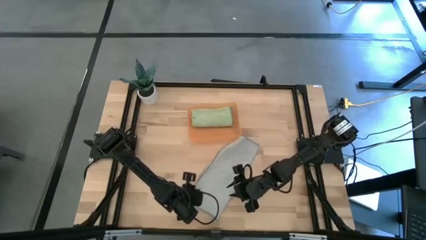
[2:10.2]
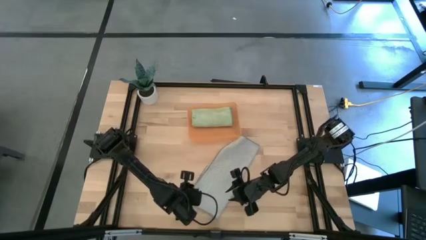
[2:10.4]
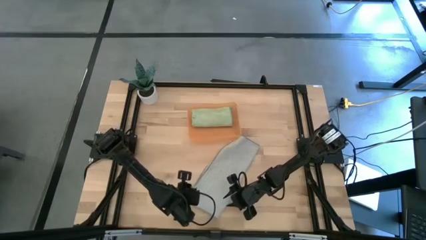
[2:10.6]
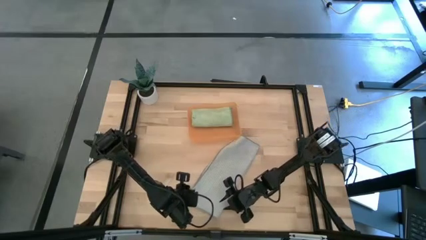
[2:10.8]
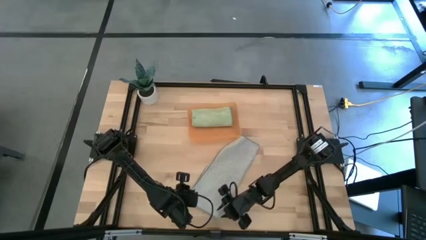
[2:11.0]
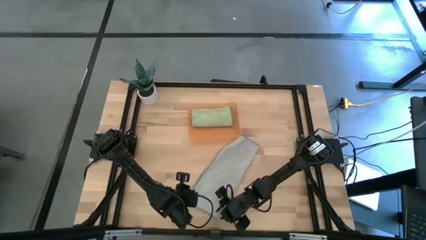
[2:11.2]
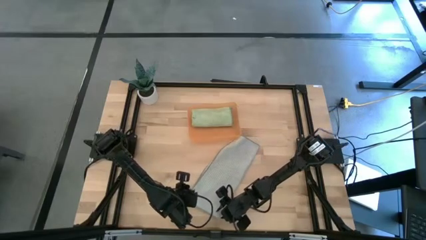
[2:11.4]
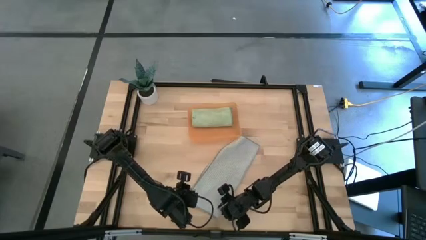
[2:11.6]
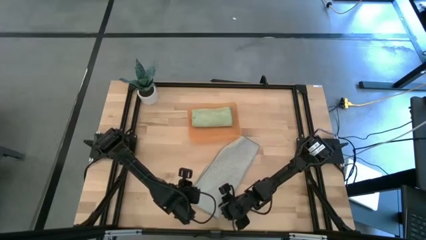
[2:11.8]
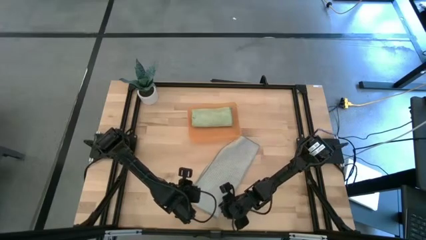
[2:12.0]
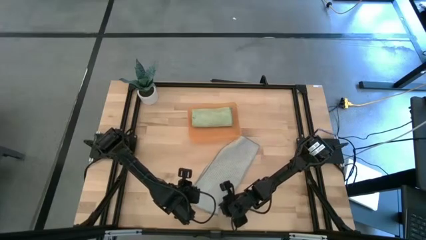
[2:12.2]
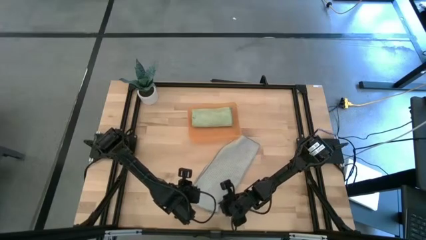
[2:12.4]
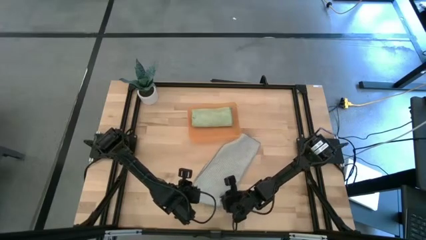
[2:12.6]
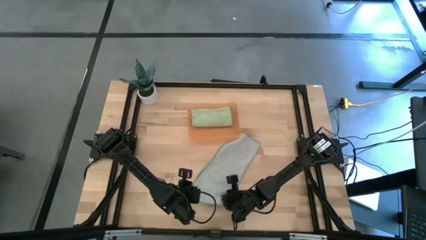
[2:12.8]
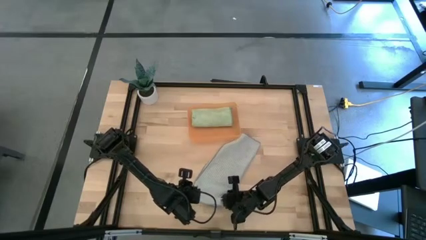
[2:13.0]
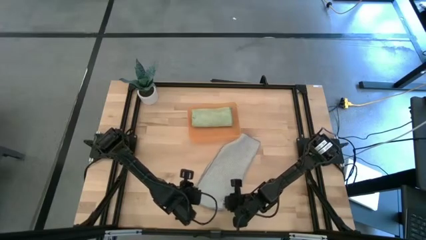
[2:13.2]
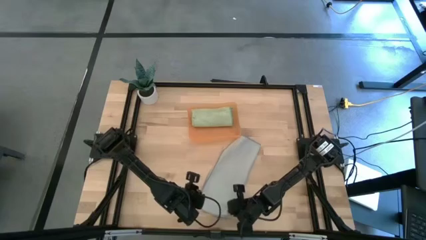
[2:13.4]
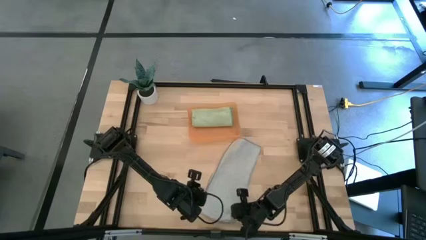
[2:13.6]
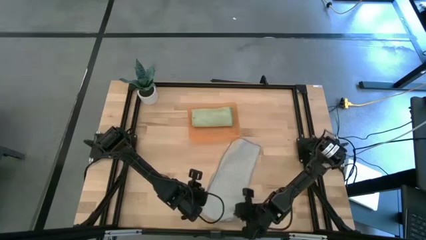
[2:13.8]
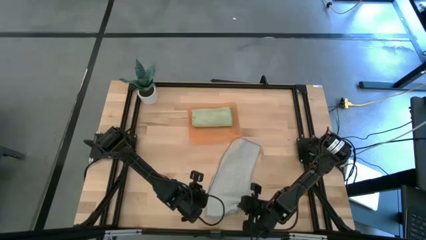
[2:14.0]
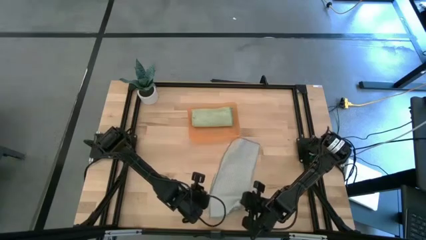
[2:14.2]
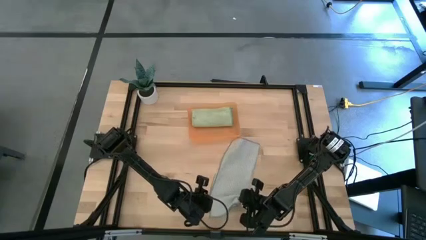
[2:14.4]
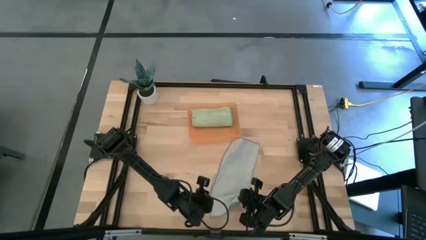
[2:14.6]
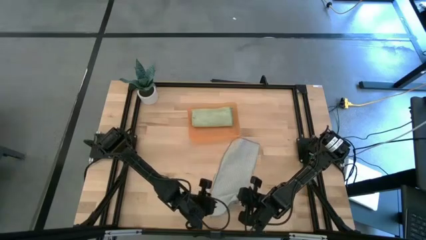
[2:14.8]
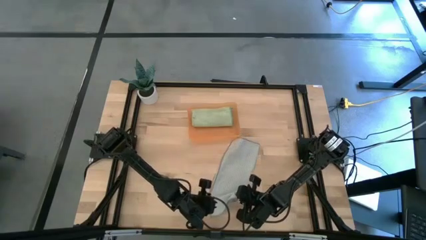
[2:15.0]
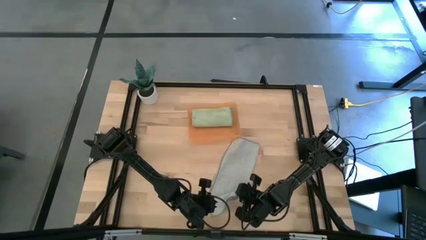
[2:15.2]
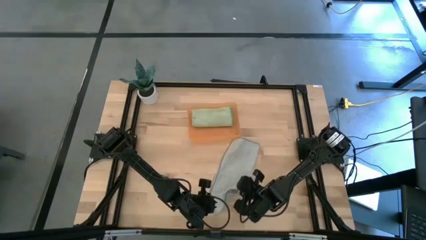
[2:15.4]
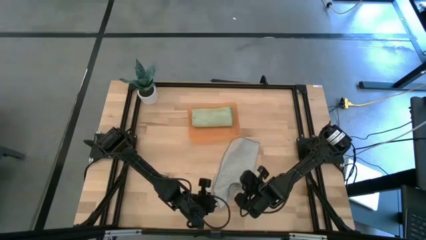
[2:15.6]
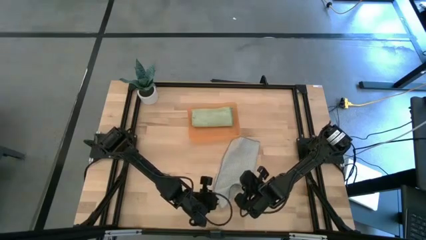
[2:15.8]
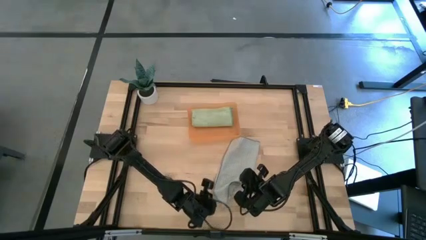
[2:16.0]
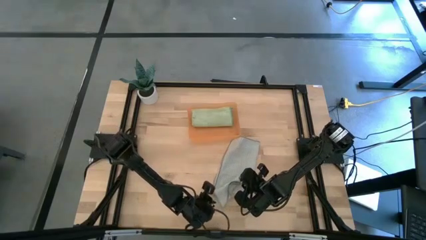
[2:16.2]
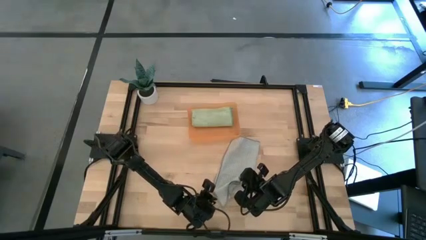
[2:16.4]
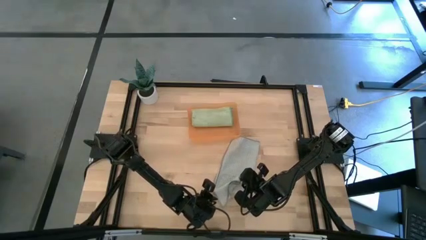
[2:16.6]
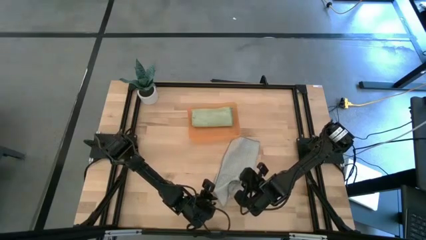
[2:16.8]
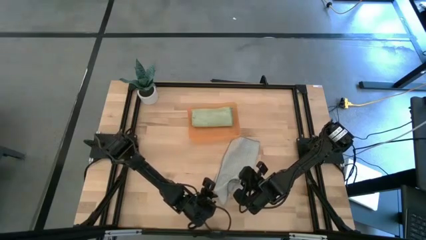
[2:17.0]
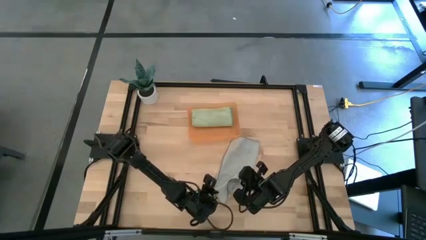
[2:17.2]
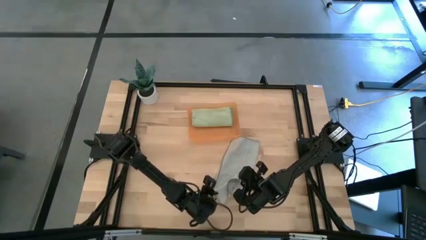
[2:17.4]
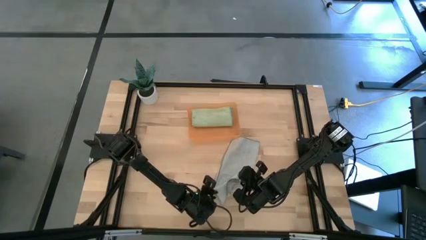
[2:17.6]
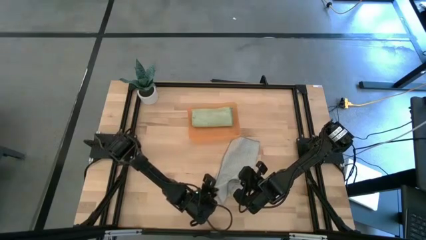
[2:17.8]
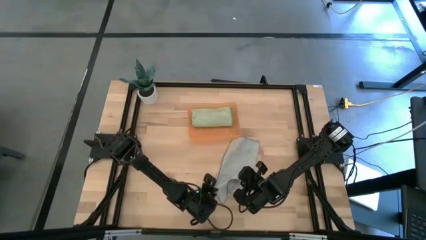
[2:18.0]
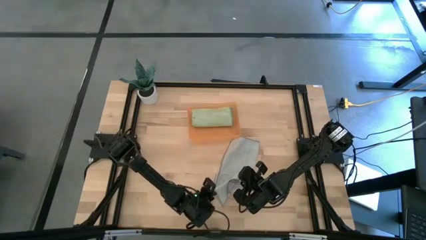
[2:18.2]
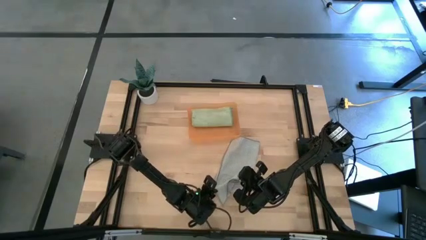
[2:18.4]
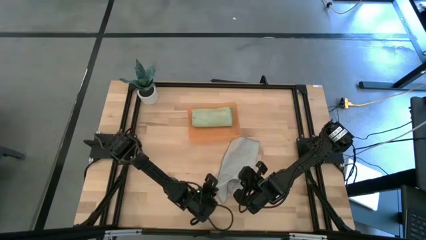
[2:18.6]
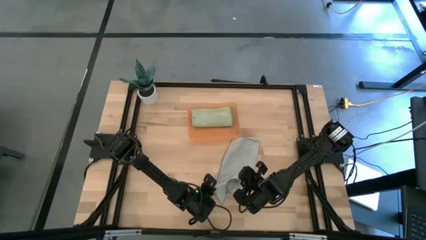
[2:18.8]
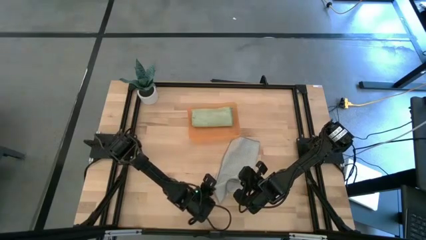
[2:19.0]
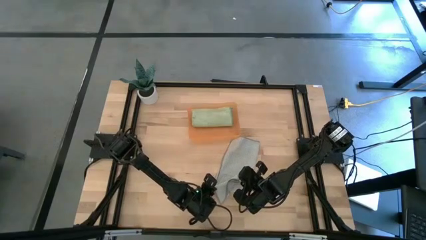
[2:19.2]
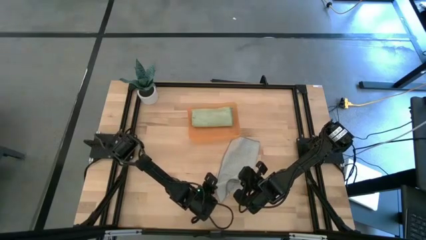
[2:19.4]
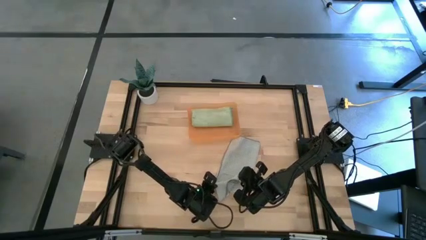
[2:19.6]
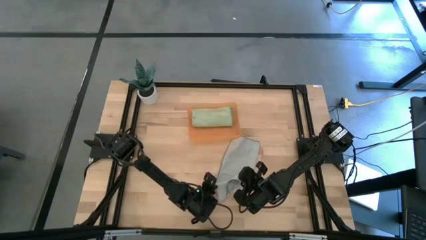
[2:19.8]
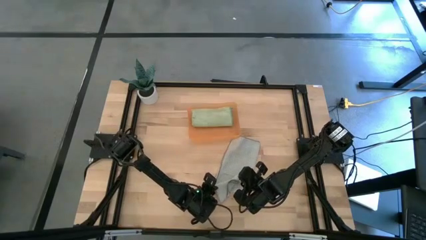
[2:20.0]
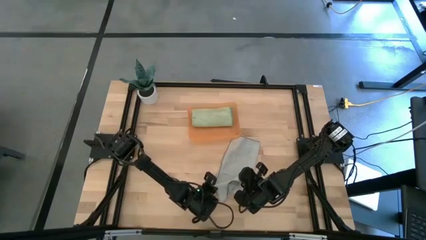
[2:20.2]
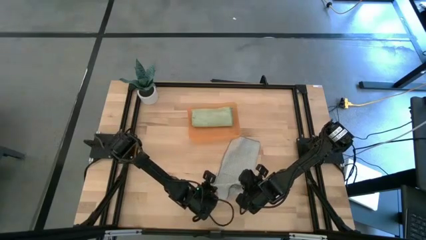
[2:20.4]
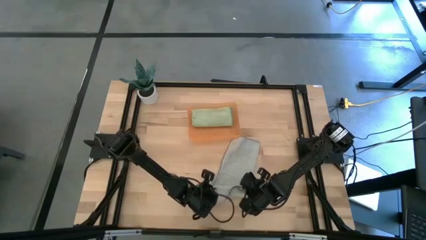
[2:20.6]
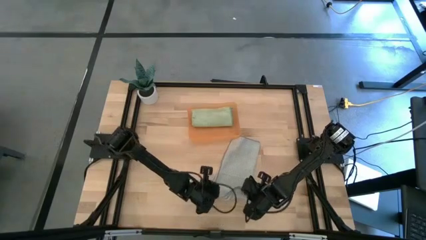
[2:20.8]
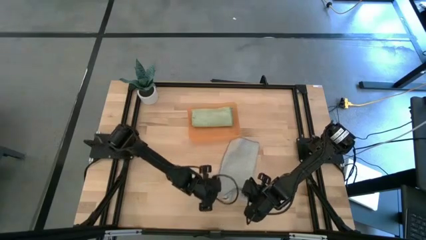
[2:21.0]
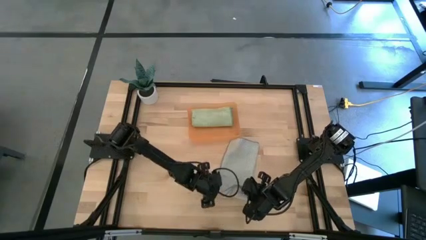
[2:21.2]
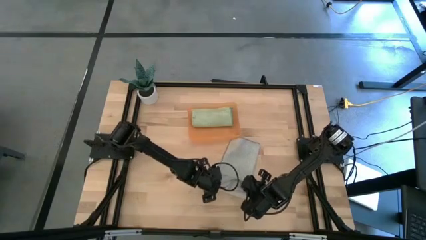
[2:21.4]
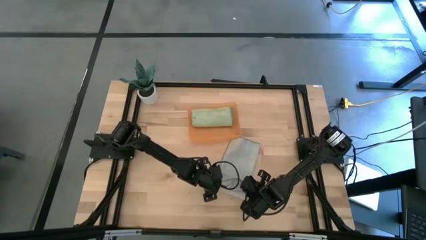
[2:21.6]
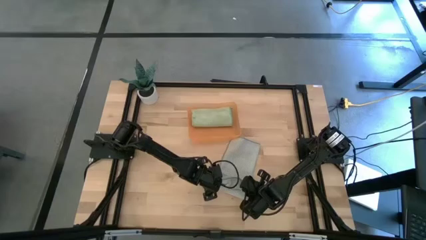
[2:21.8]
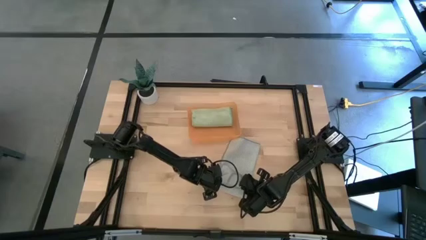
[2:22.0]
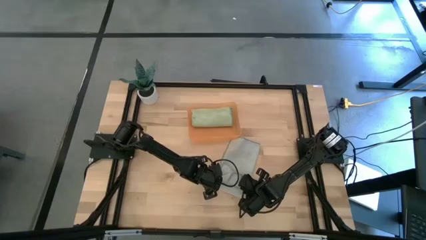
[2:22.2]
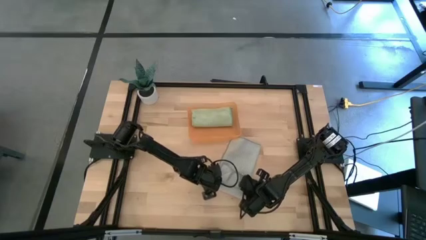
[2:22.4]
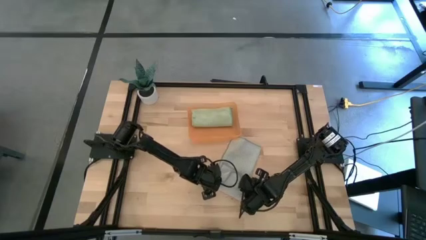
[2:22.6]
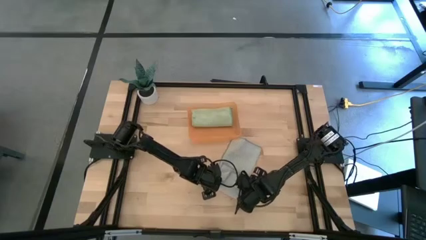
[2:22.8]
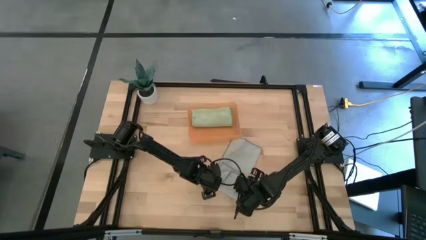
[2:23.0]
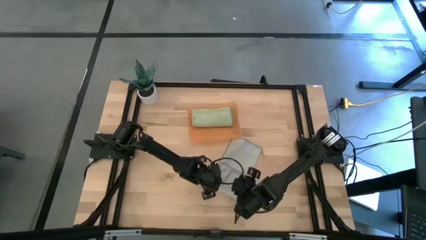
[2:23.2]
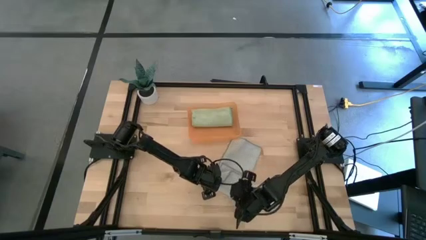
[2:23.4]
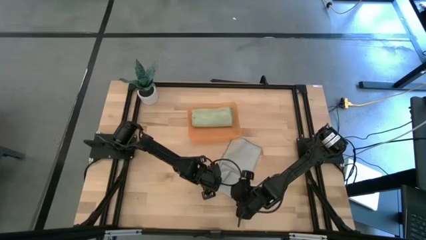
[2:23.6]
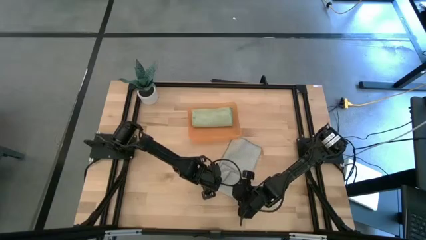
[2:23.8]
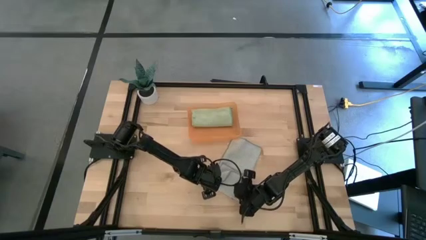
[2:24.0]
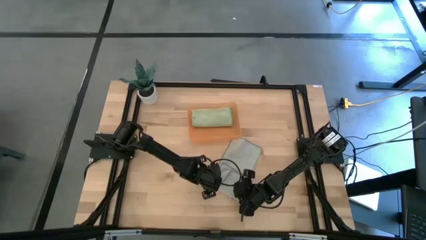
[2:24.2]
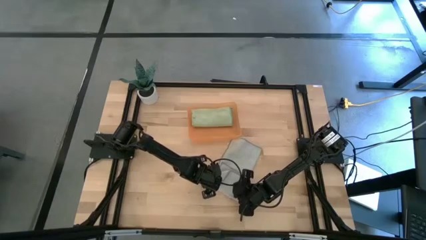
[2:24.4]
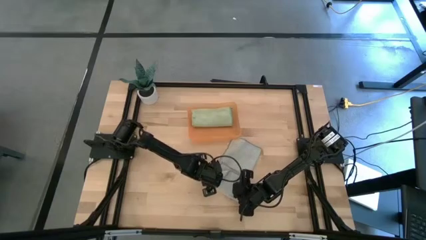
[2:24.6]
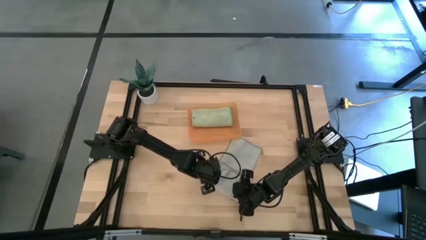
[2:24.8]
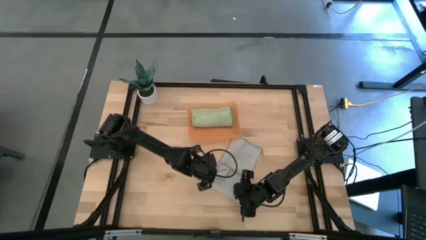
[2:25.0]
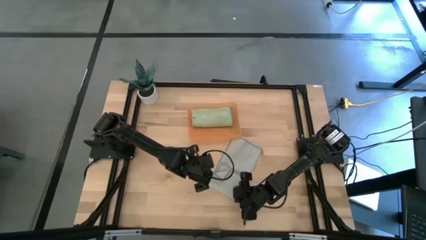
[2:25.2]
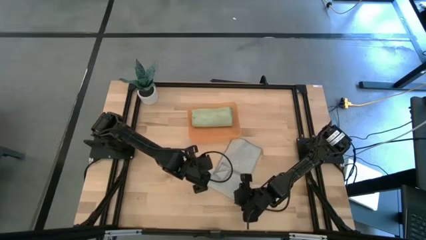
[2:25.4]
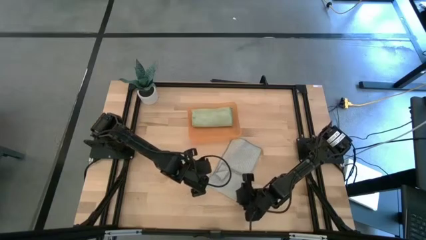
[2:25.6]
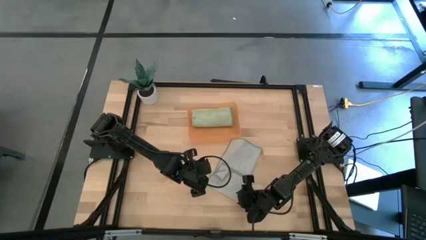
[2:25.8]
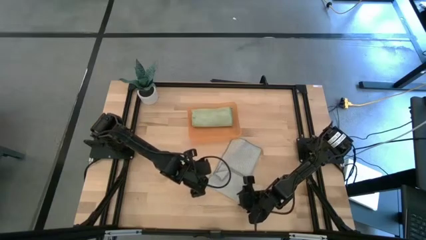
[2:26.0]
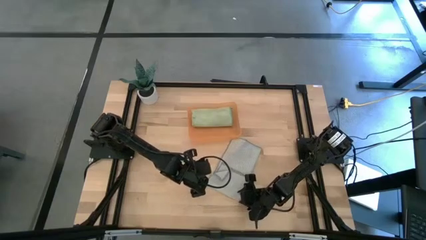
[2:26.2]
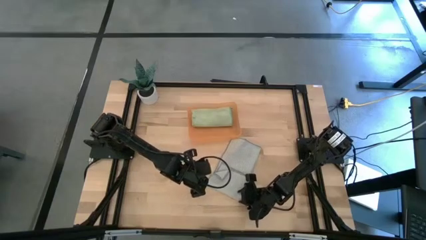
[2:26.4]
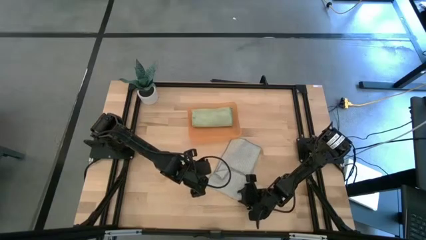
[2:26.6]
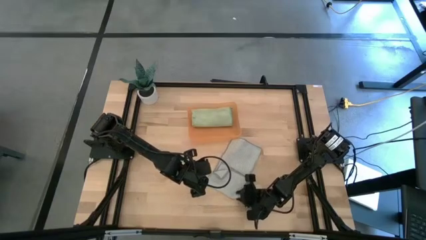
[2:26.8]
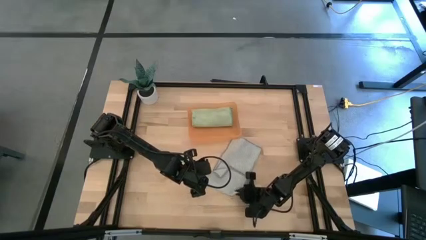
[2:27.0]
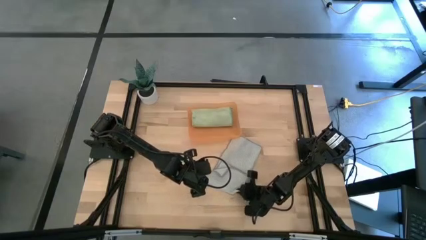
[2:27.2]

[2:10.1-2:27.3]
Task: Roll microfiber towels into tight, uniform cylinder then place into a basket
Roll the gray microfiber towel
